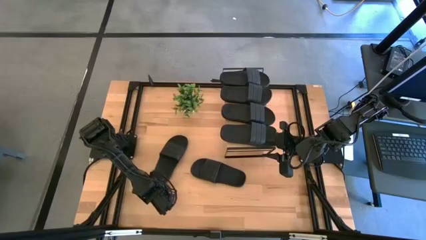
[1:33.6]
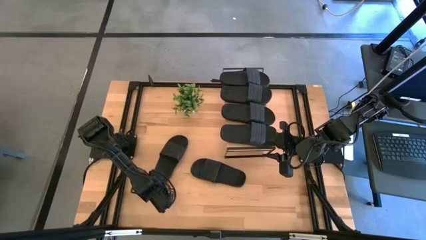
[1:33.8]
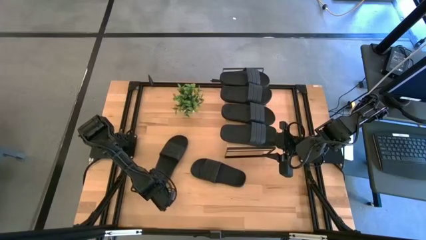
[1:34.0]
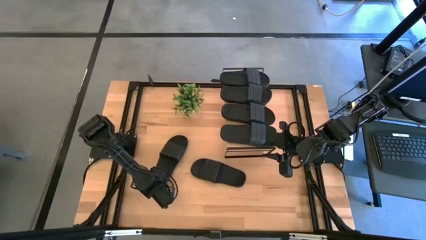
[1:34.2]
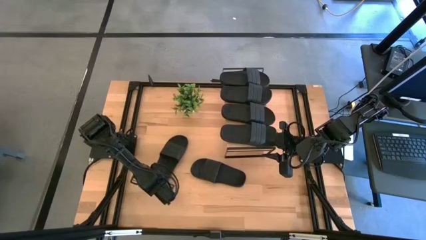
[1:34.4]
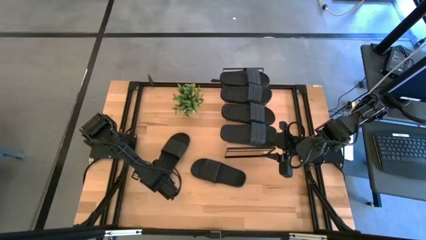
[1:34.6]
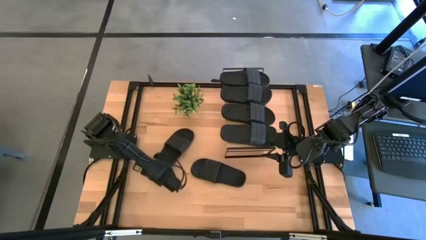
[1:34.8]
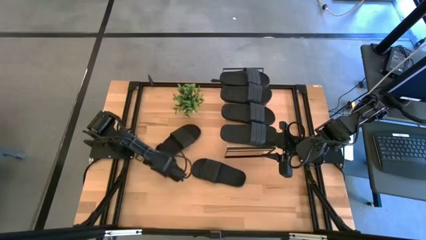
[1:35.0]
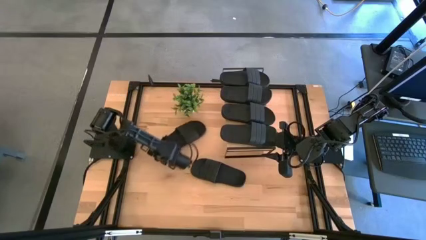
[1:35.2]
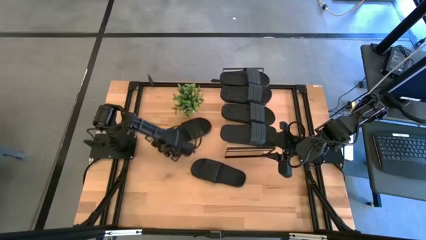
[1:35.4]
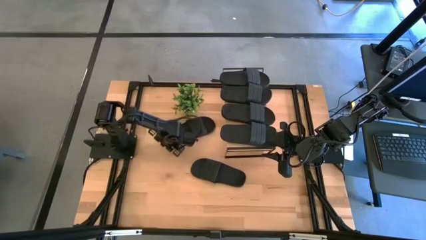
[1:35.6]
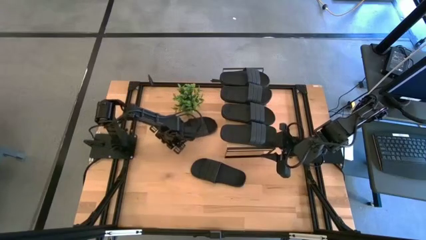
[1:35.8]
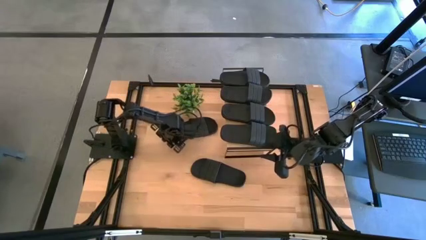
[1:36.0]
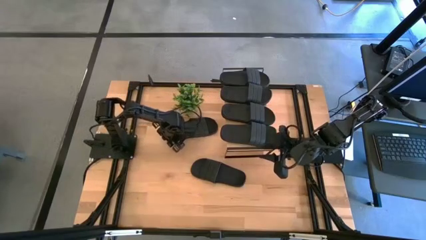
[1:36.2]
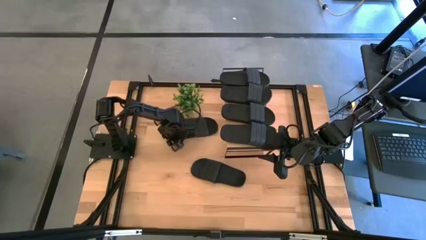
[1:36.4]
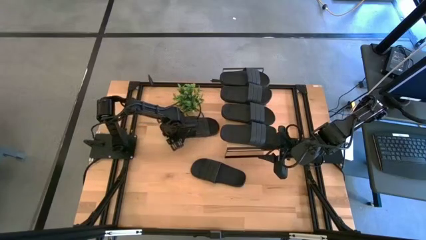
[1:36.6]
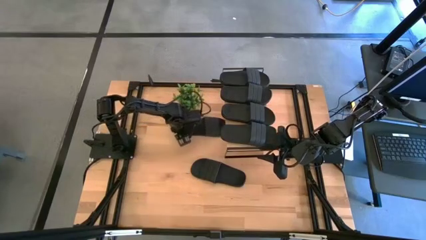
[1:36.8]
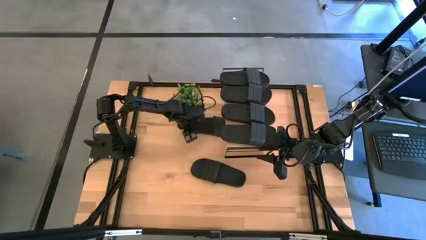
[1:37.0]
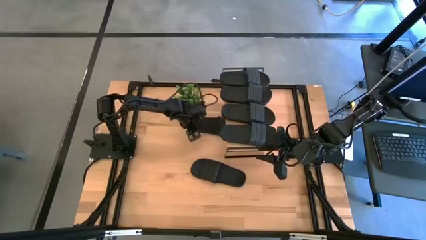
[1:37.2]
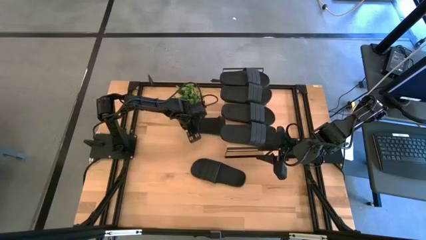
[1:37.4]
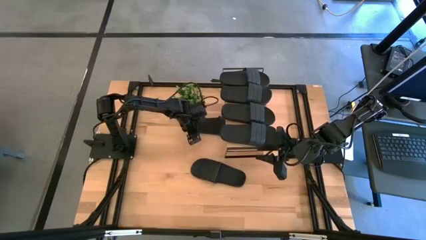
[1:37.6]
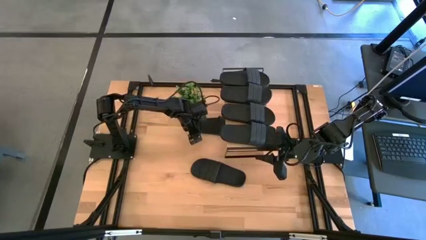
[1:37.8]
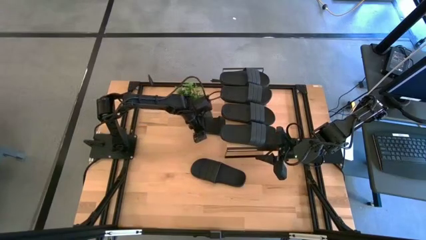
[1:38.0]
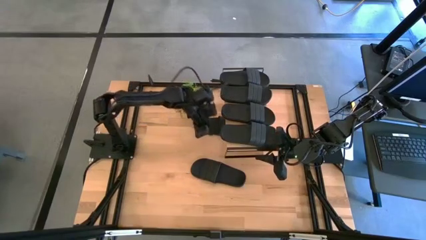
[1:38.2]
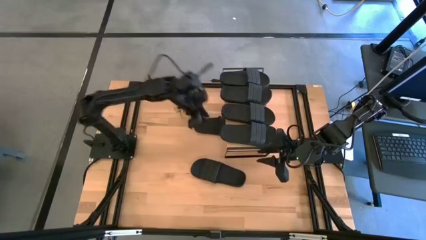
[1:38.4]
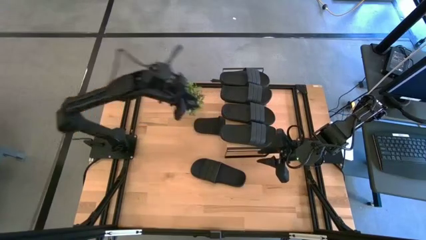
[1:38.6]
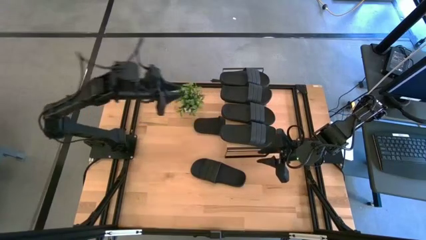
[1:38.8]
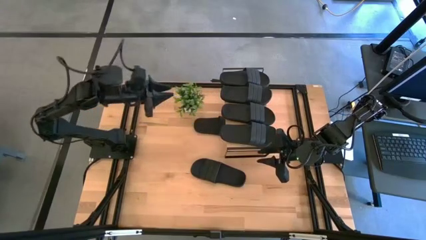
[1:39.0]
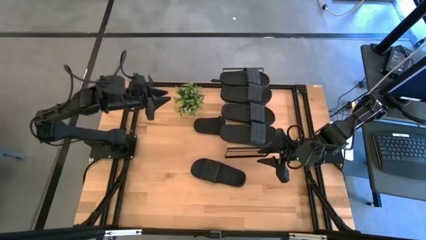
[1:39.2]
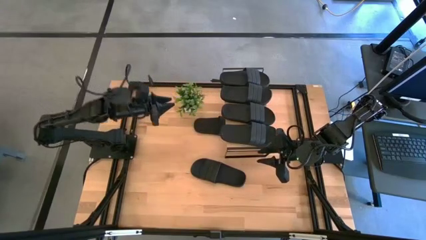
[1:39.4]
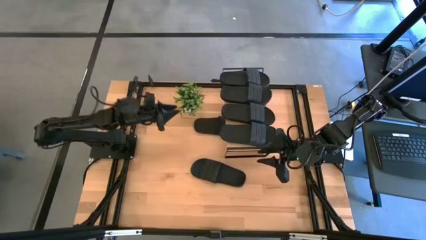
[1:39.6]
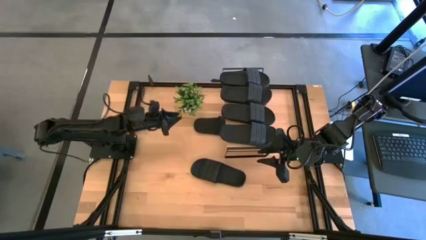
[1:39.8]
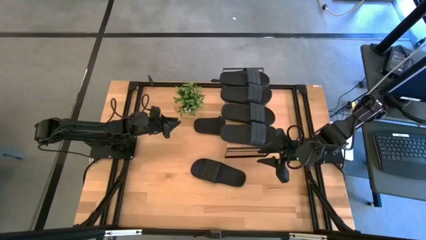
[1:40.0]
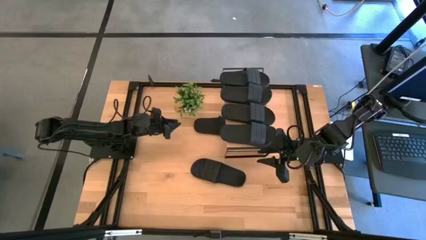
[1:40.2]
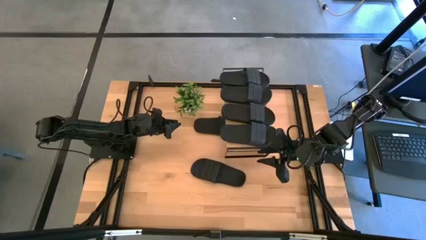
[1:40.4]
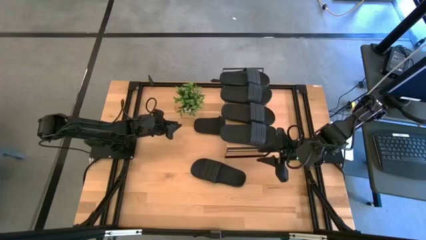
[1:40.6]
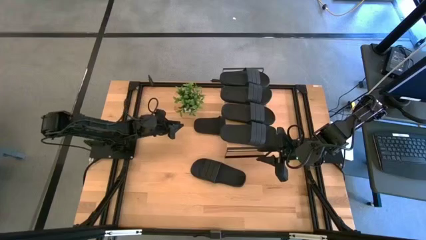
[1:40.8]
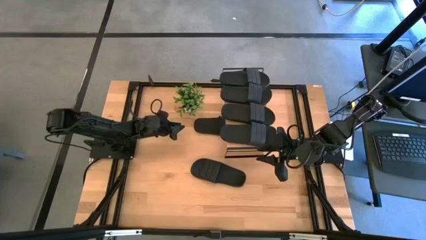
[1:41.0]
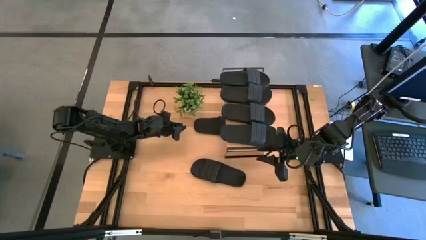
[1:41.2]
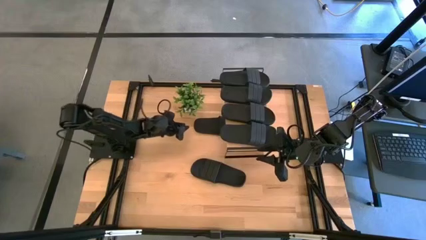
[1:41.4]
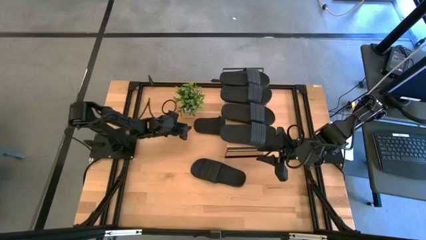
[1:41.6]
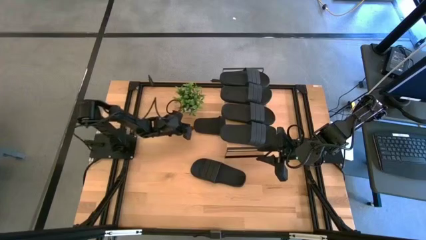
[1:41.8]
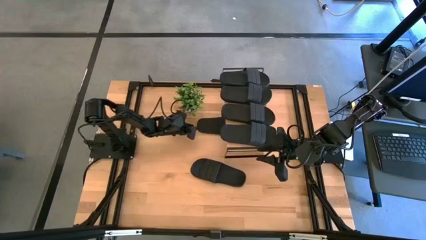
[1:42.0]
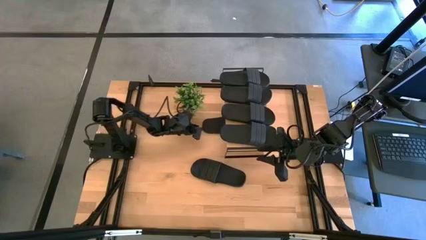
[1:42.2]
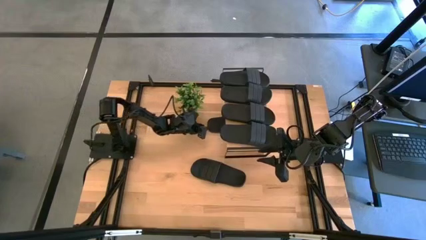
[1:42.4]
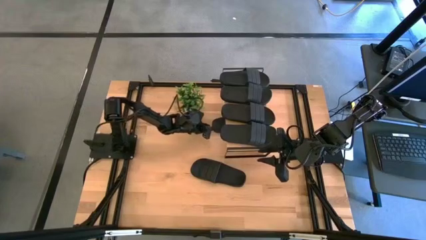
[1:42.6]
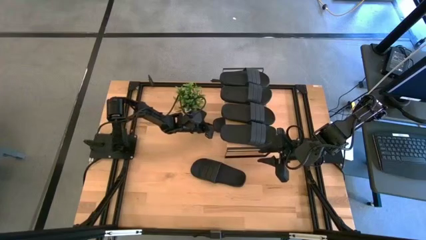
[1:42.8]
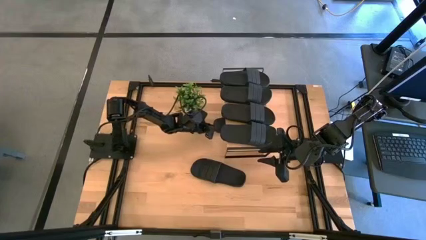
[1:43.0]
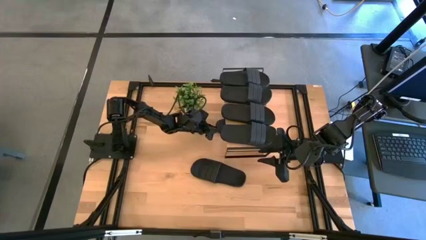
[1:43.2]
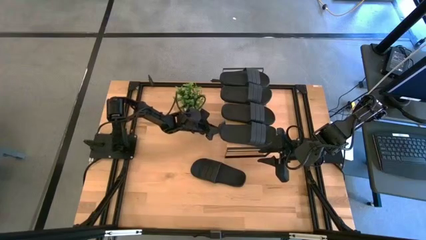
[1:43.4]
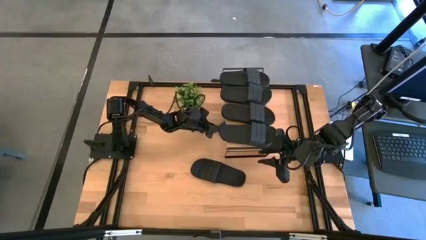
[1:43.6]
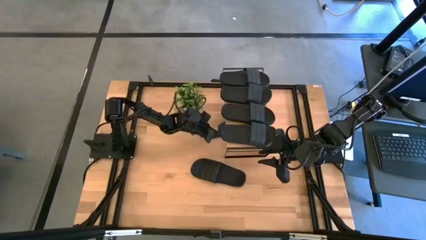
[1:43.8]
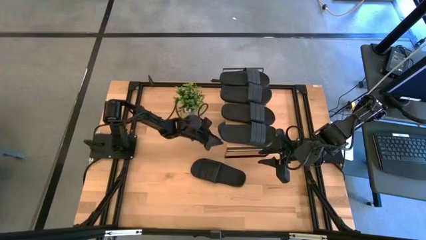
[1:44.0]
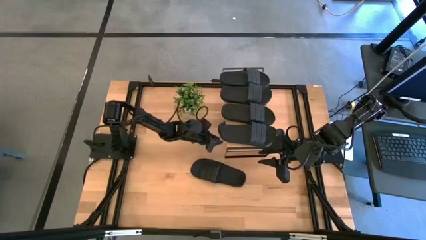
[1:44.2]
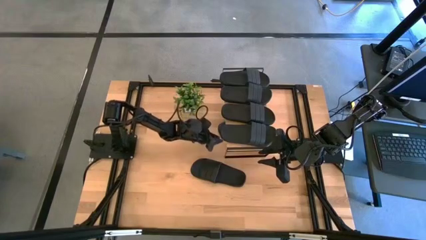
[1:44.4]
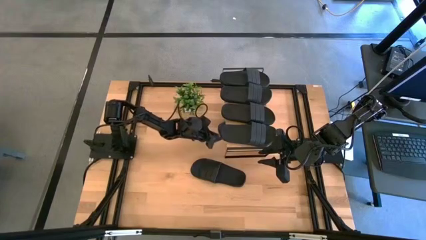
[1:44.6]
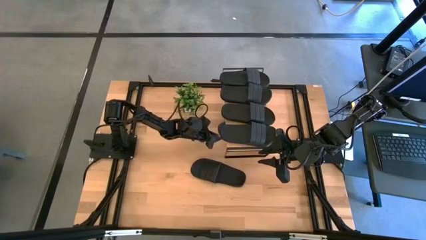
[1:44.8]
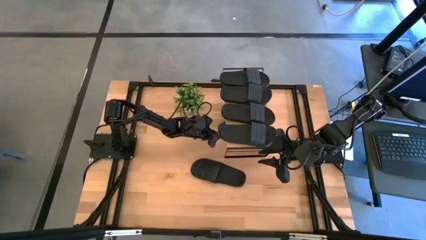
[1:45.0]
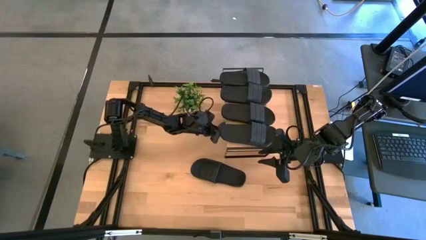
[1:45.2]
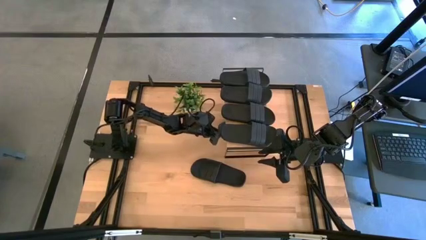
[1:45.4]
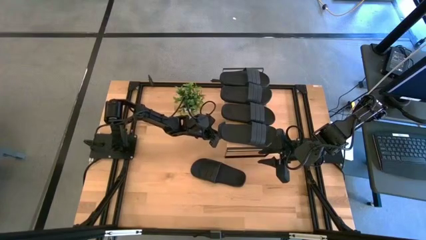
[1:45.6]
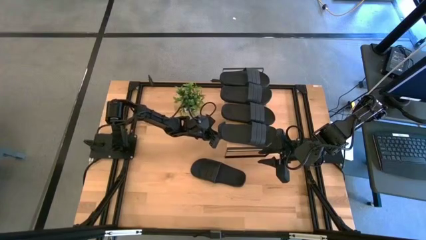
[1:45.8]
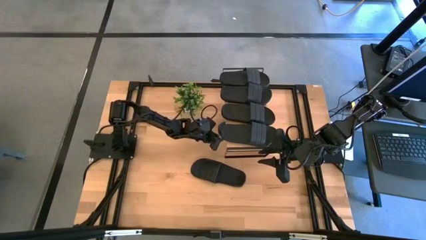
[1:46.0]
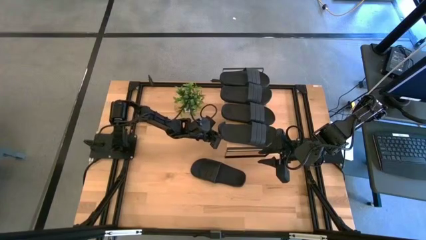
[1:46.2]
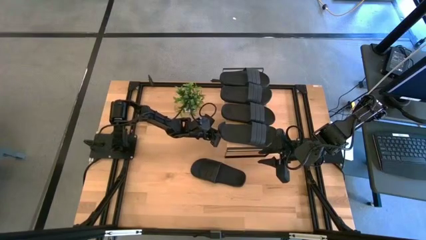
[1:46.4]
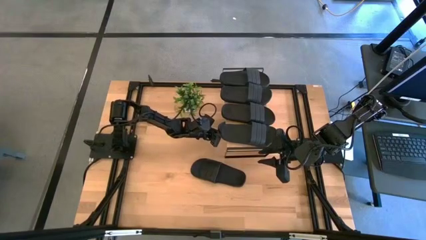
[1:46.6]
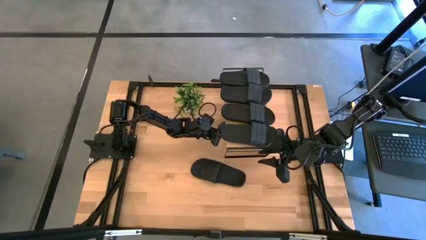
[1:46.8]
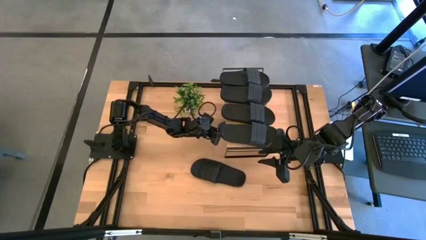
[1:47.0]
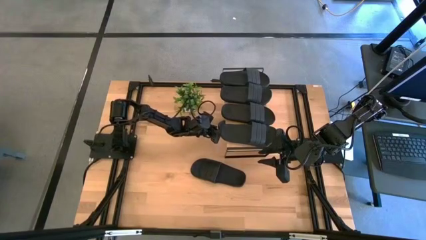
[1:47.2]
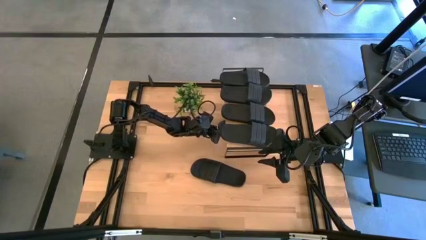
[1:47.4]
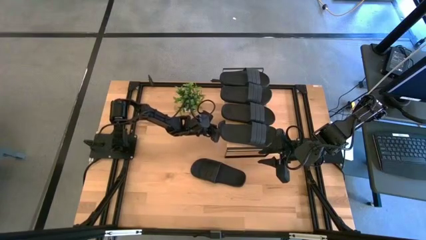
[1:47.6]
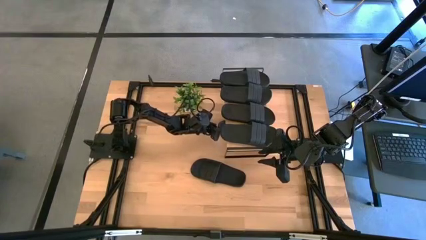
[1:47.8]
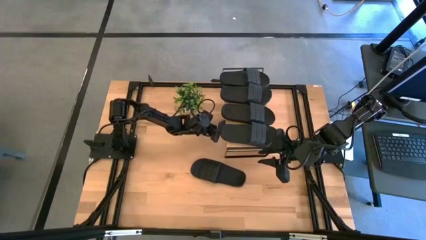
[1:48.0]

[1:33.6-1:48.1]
Task: Pick and place slides into the shelf
Put the black slide under the shelf
